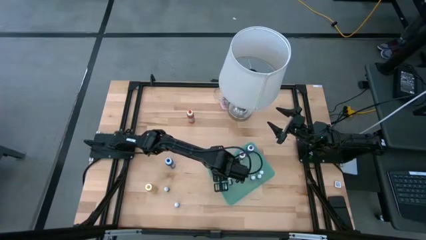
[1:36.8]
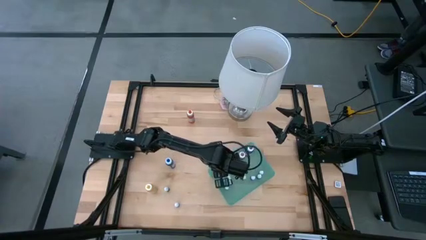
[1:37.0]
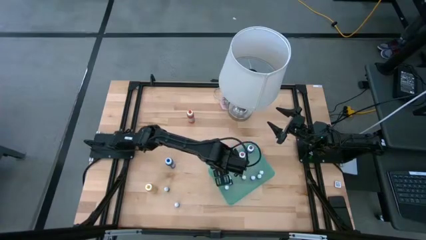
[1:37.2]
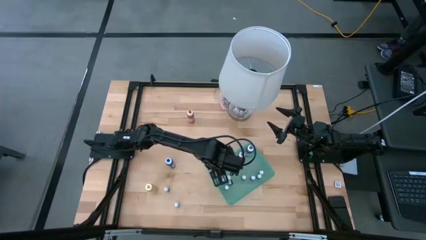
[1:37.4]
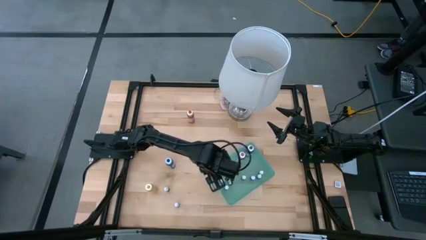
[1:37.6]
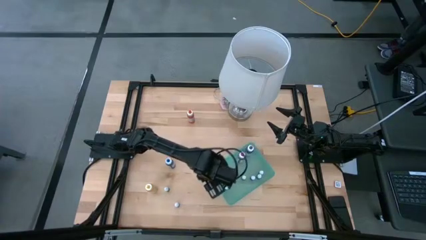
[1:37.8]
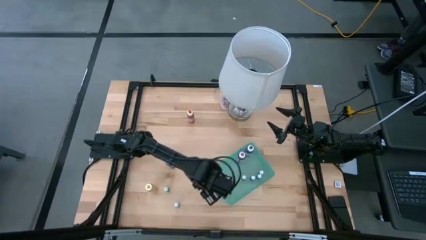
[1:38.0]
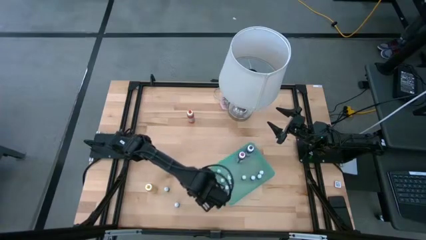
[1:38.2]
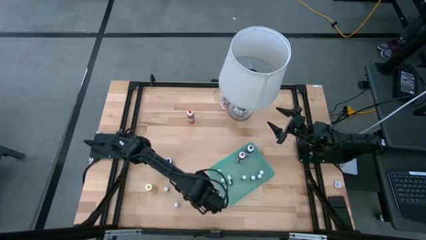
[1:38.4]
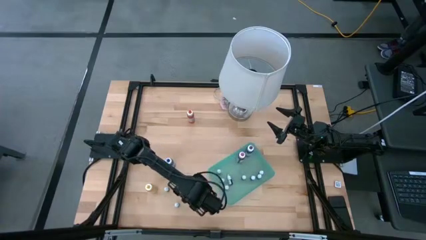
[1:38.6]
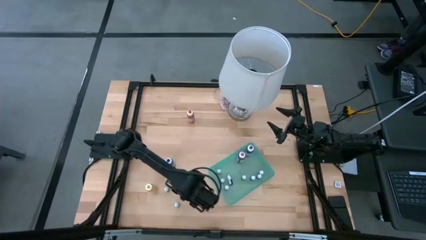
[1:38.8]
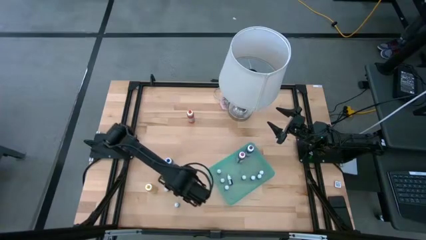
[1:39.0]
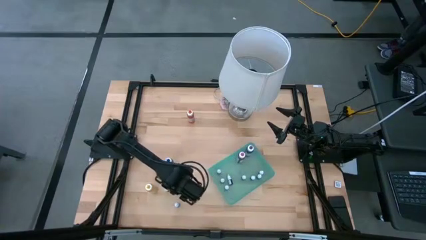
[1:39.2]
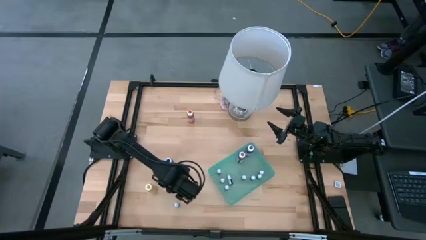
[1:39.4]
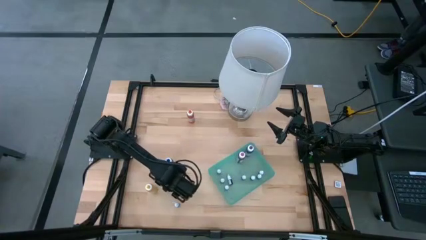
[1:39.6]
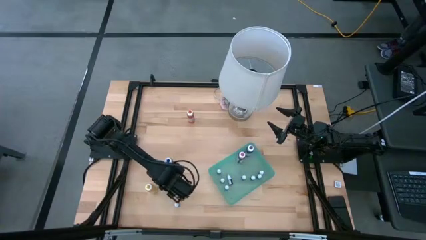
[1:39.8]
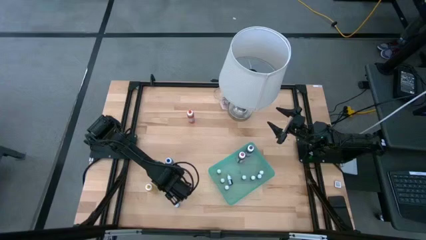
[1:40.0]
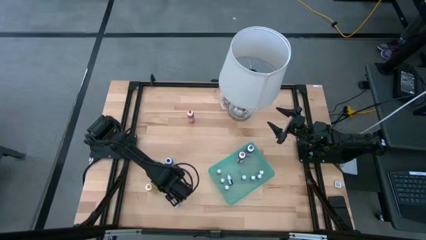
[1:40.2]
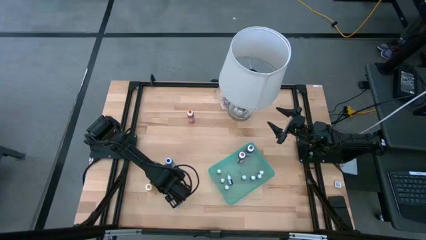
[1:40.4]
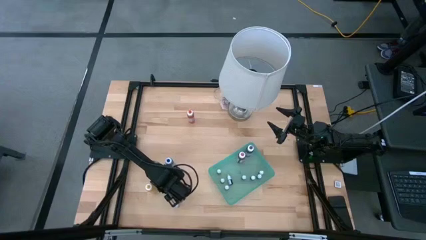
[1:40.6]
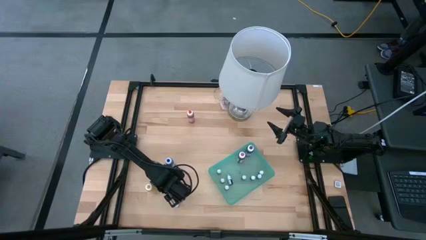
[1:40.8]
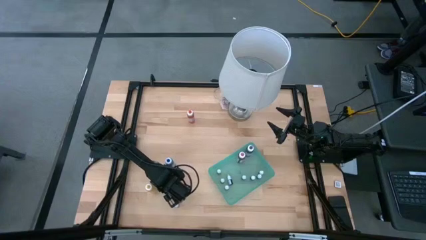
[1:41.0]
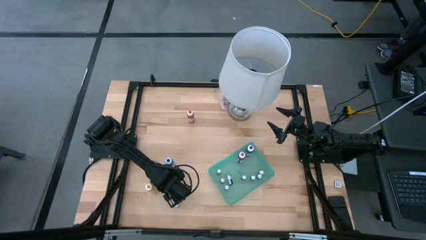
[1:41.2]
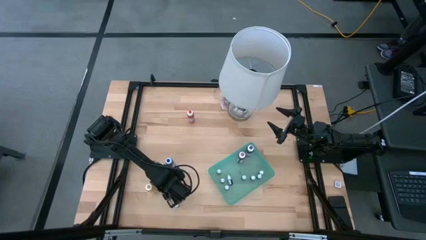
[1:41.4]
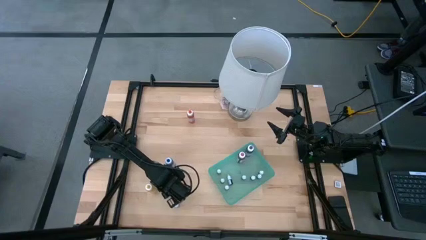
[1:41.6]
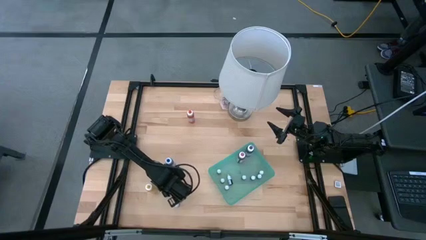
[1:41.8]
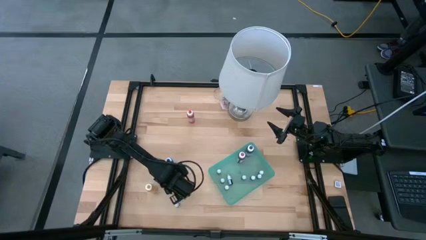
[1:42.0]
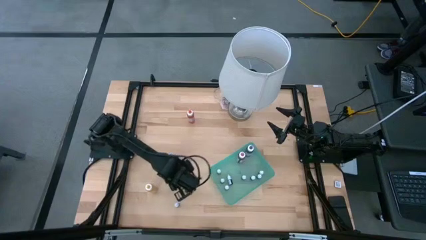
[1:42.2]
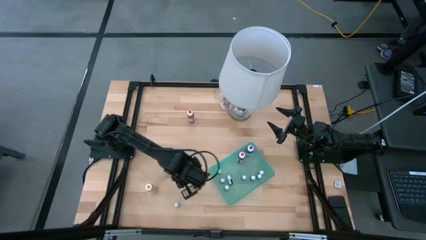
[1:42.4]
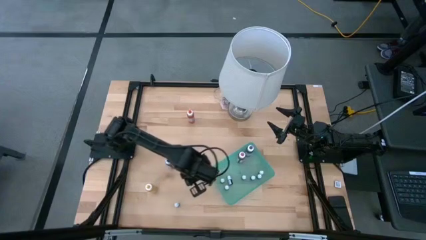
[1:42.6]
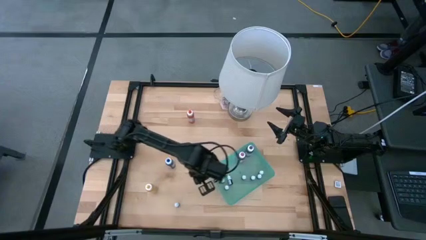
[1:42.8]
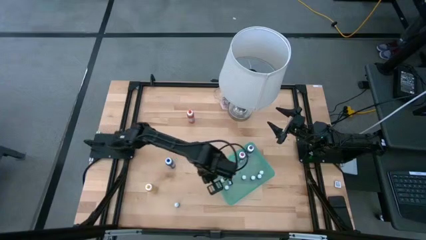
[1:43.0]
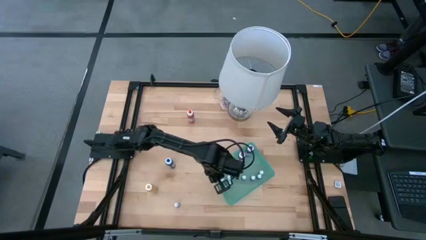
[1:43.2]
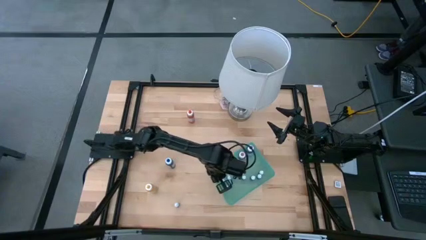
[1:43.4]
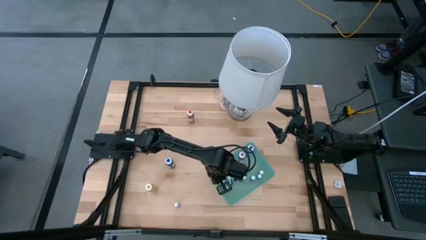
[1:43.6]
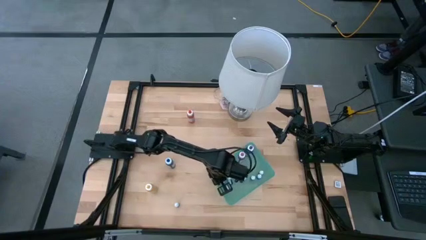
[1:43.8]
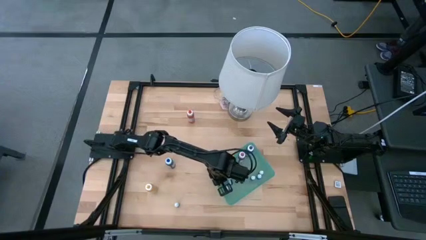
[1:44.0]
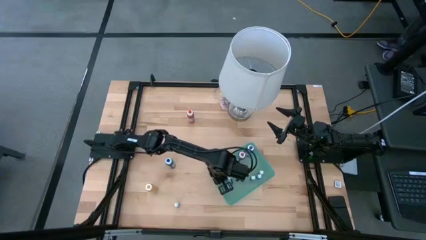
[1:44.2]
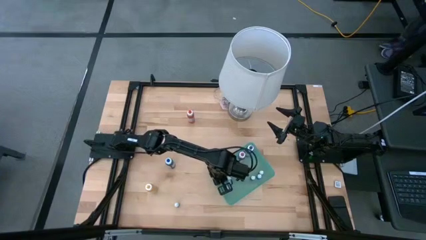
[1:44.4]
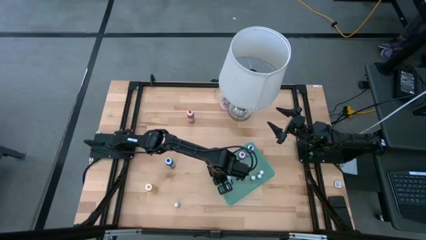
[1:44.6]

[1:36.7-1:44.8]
Task: Pick & Place food coloring
Put the small green food coloring bottle into the green bin

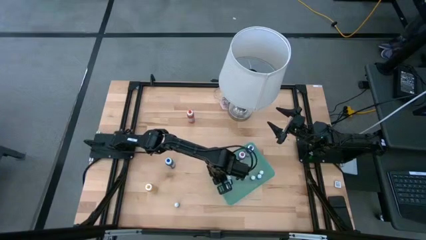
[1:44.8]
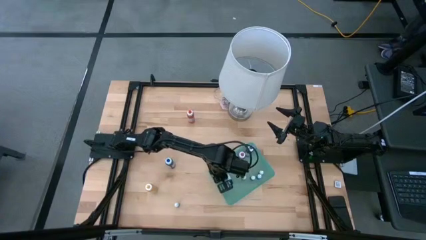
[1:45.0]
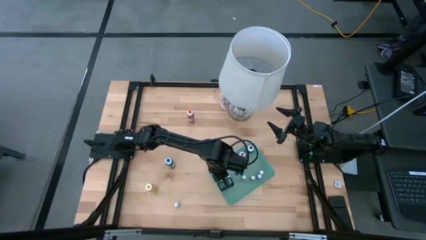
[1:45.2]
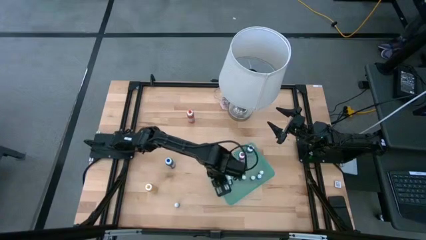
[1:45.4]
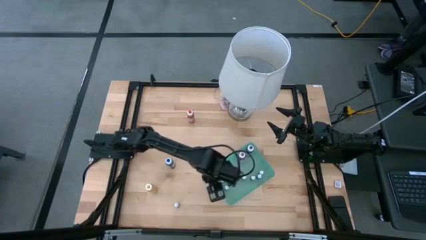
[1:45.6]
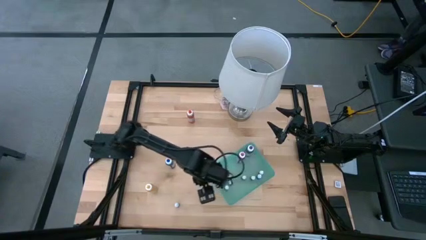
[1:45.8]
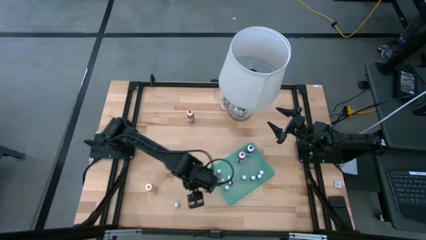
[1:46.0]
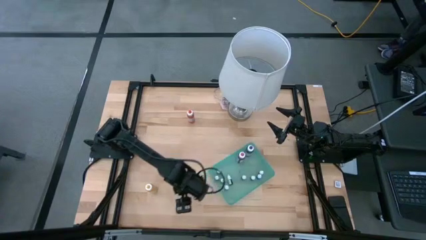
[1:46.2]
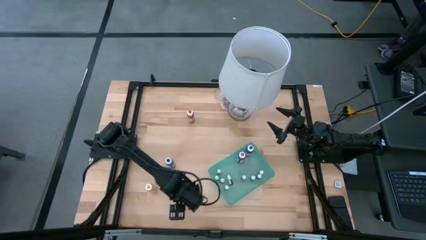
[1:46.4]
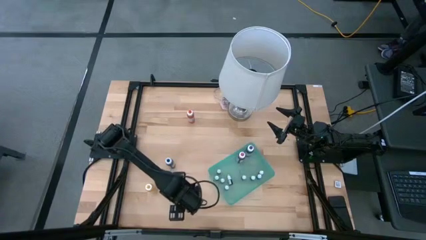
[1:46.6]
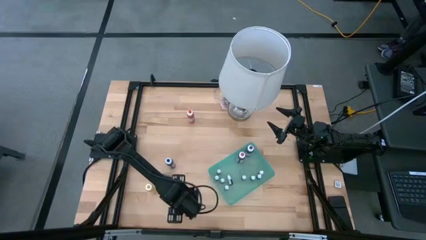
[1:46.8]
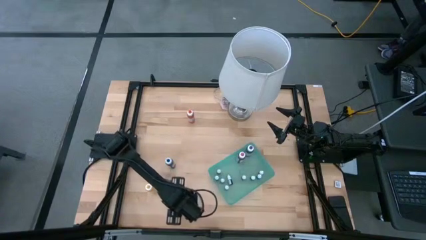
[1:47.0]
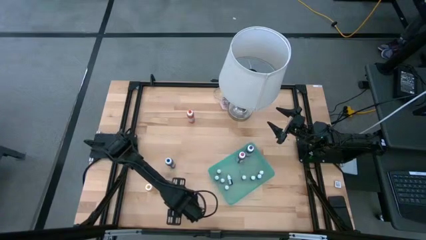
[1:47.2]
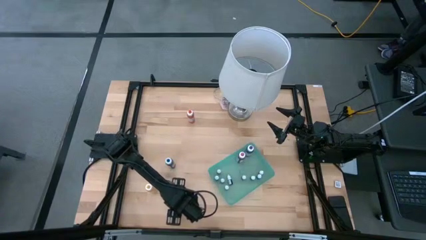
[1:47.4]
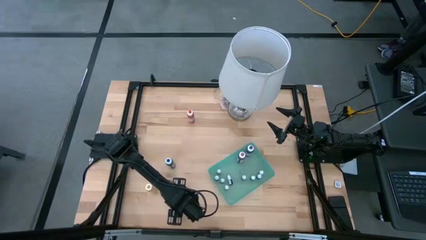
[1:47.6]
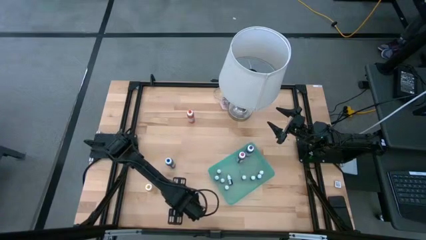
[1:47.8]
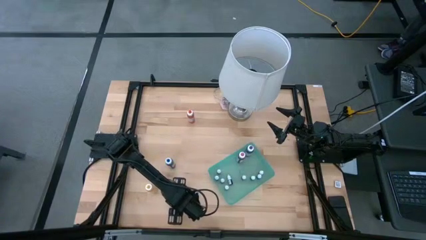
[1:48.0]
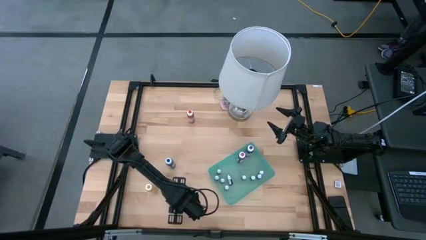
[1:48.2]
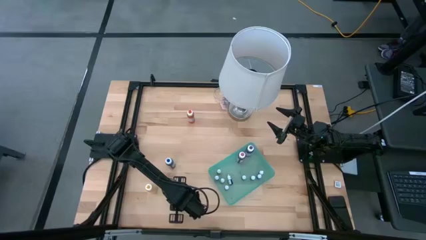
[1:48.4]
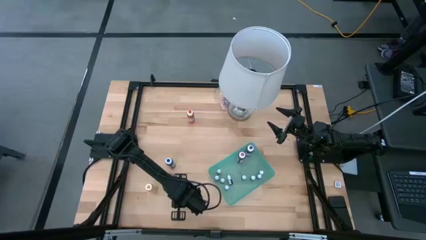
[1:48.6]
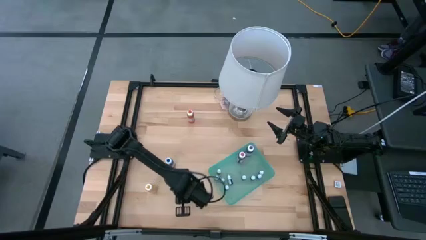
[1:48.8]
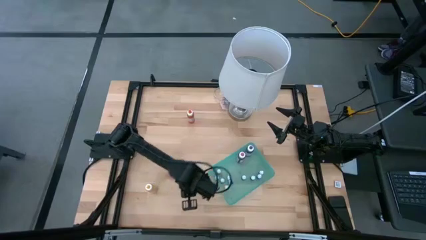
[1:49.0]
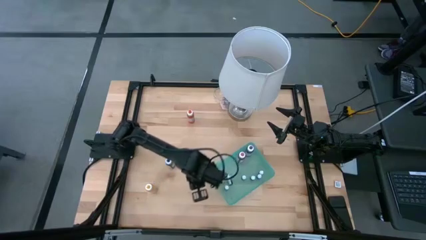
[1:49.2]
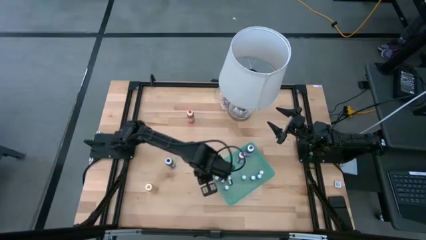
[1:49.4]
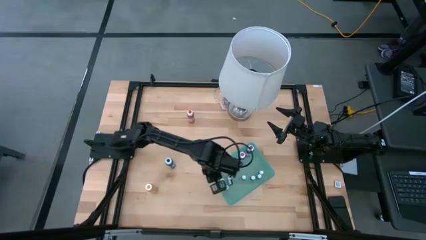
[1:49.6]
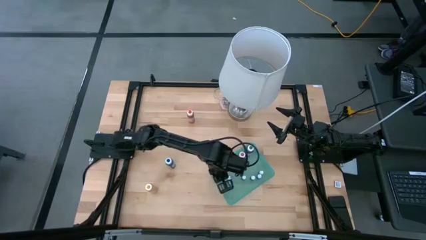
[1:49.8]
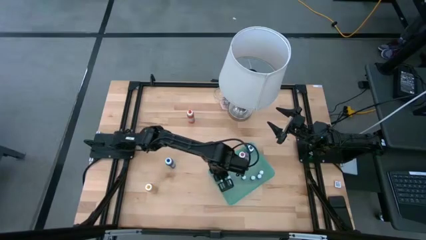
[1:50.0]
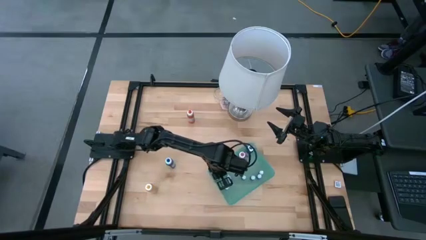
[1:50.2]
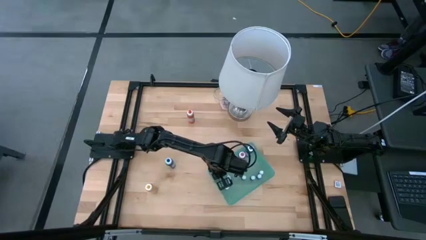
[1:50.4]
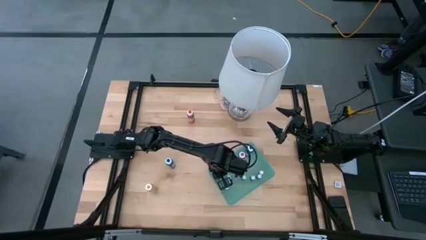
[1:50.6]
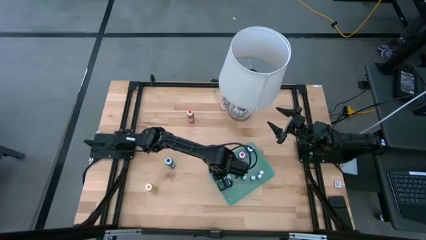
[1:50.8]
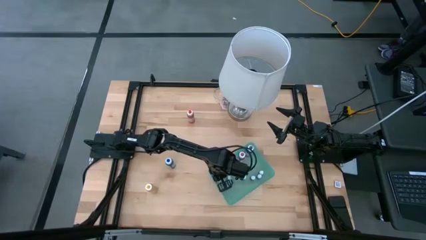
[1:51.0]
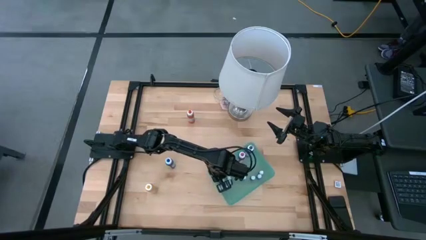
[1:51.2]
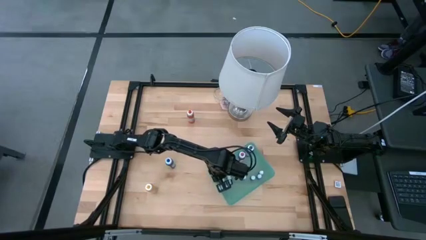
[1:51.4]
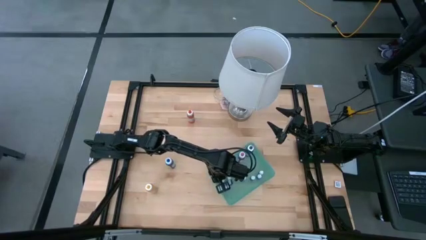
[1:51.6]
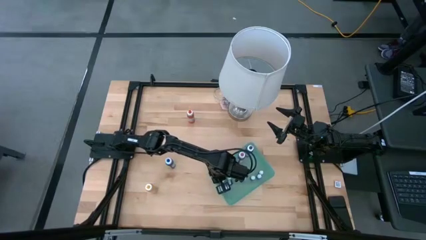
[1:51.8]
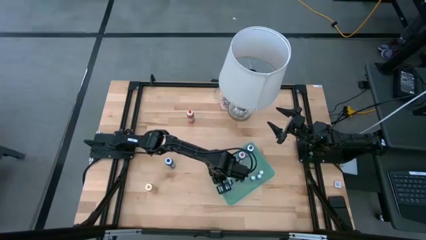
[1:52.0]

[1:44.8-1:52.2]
Put the small green food coloring bottle into the green bin
